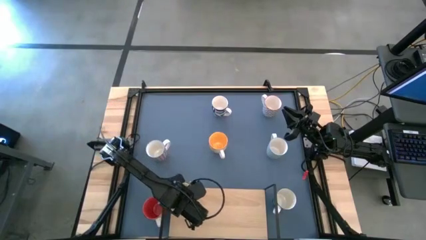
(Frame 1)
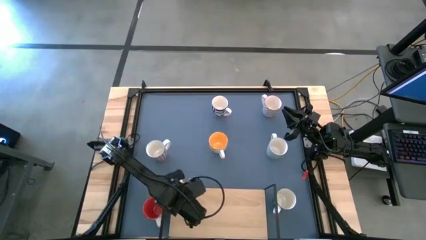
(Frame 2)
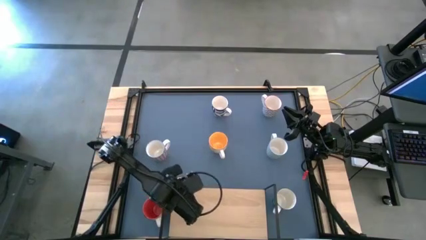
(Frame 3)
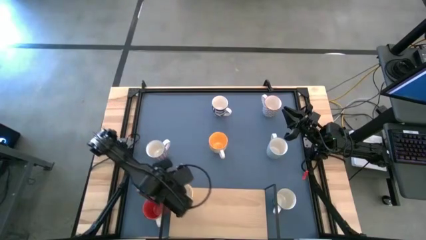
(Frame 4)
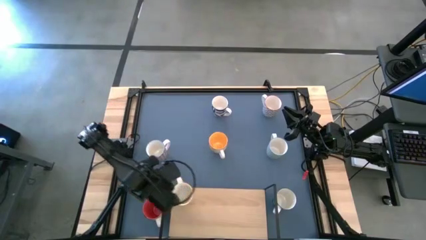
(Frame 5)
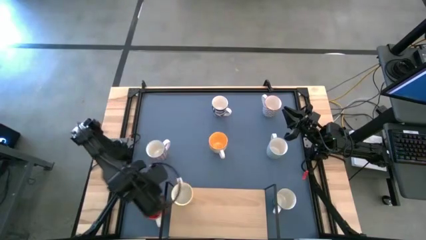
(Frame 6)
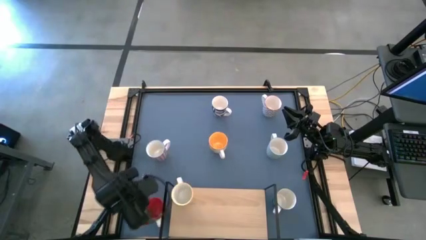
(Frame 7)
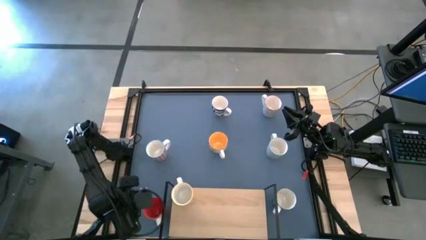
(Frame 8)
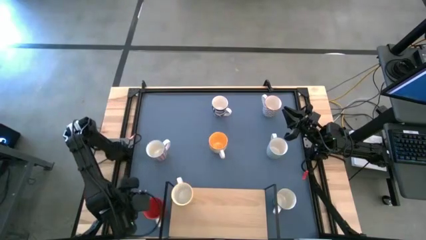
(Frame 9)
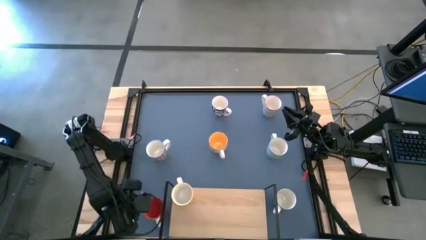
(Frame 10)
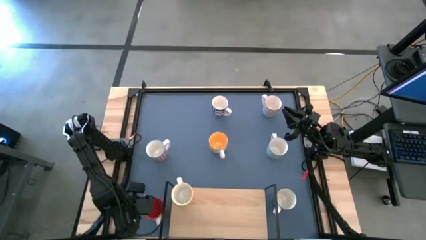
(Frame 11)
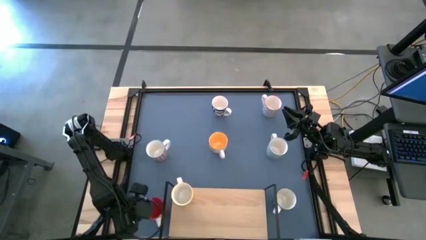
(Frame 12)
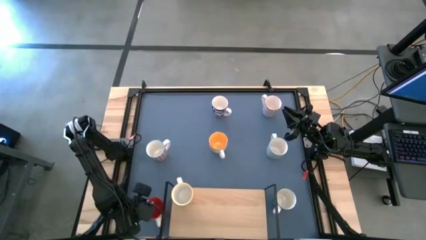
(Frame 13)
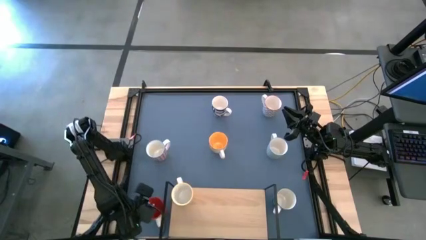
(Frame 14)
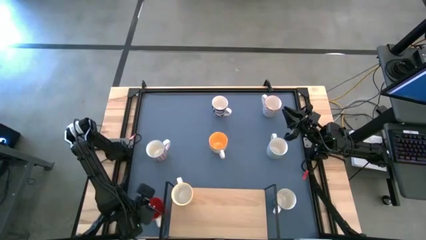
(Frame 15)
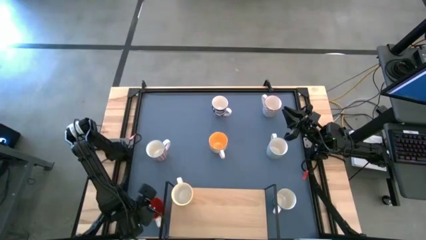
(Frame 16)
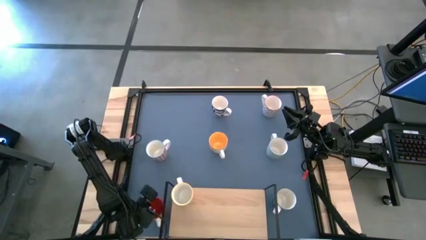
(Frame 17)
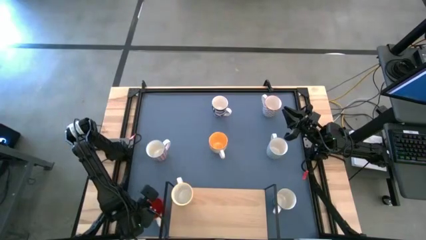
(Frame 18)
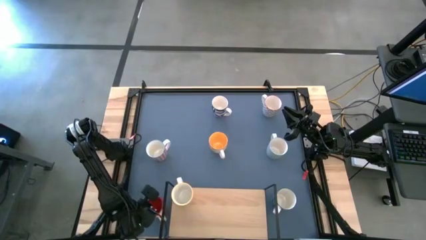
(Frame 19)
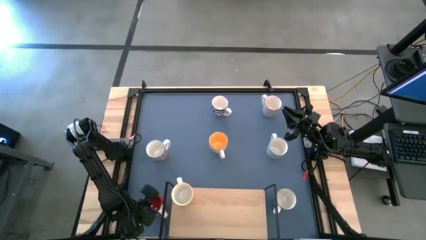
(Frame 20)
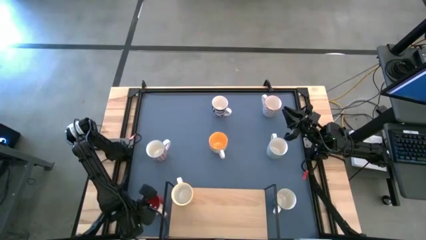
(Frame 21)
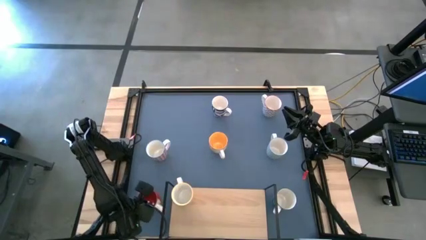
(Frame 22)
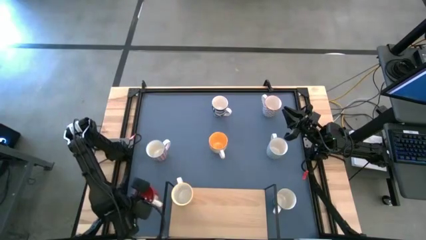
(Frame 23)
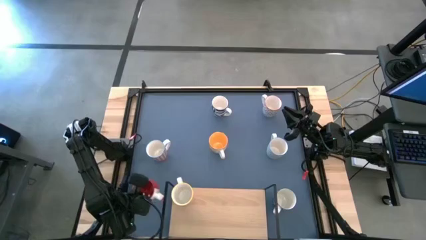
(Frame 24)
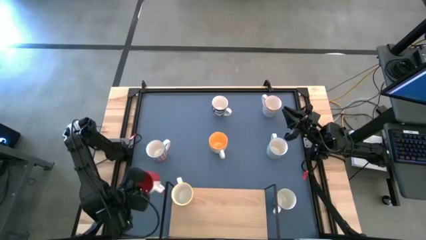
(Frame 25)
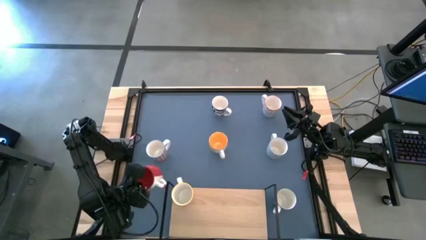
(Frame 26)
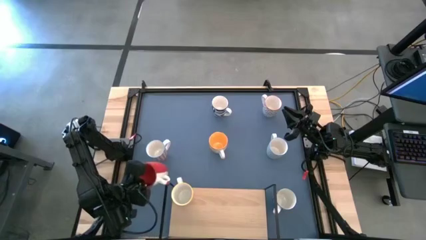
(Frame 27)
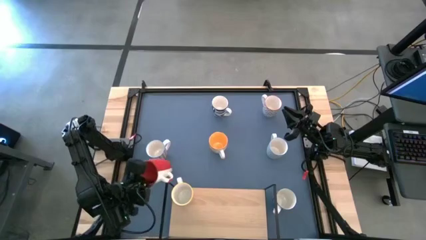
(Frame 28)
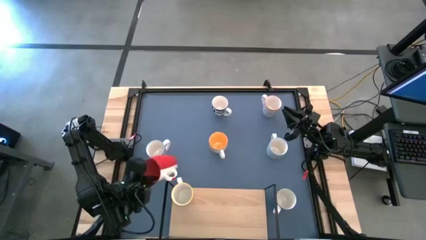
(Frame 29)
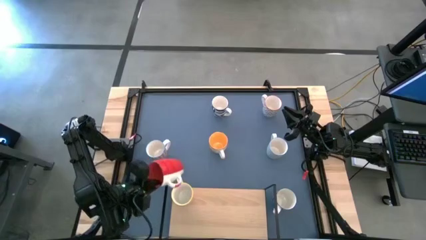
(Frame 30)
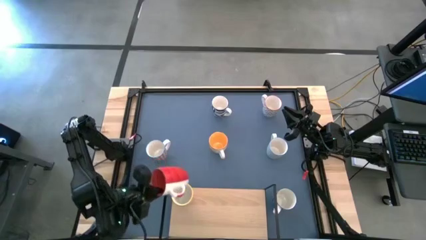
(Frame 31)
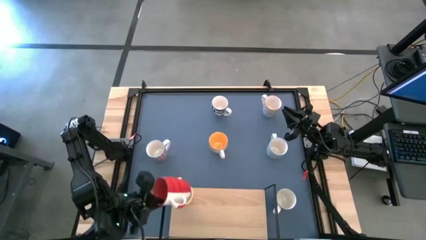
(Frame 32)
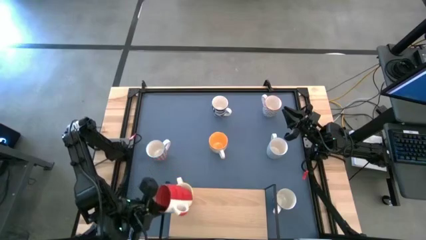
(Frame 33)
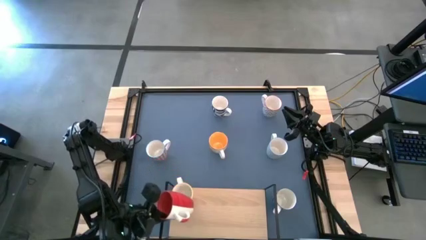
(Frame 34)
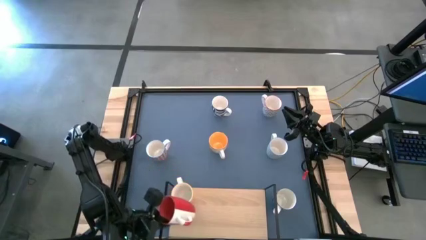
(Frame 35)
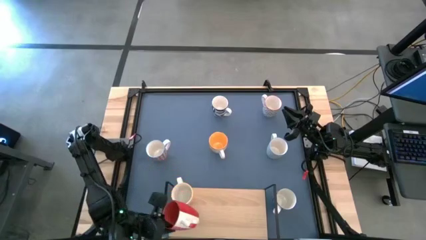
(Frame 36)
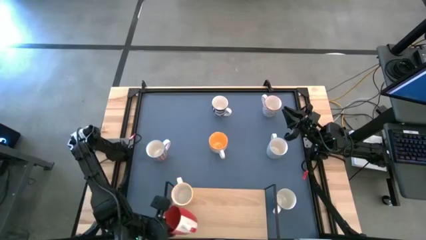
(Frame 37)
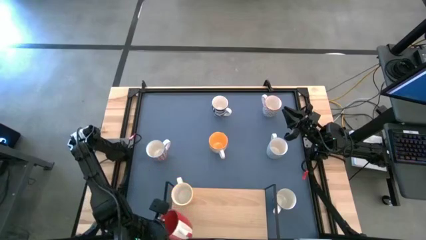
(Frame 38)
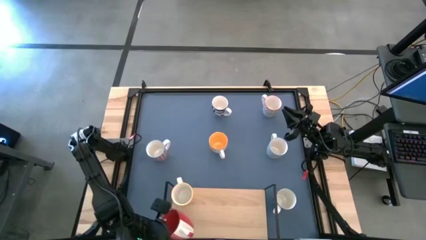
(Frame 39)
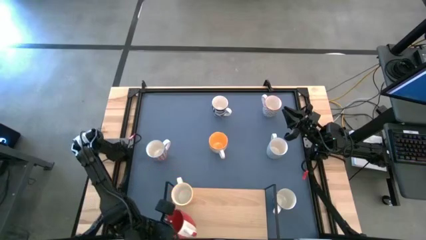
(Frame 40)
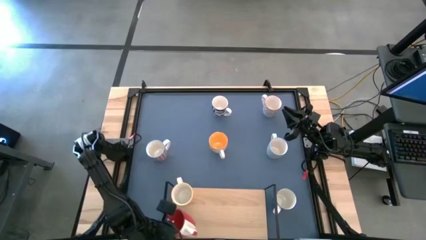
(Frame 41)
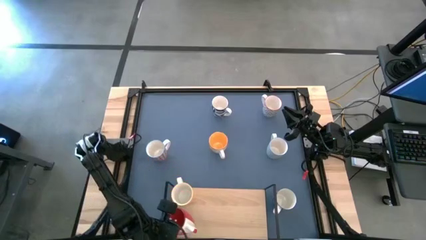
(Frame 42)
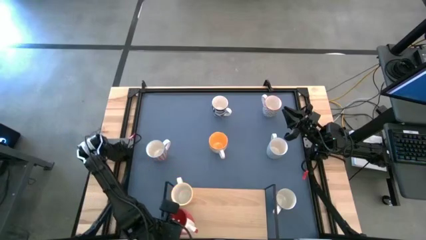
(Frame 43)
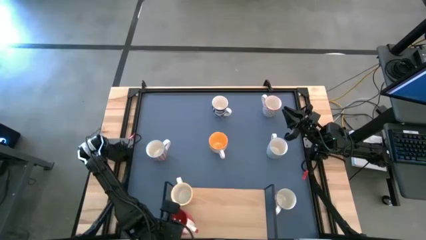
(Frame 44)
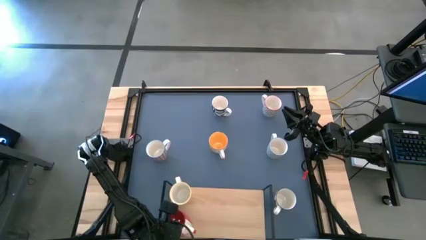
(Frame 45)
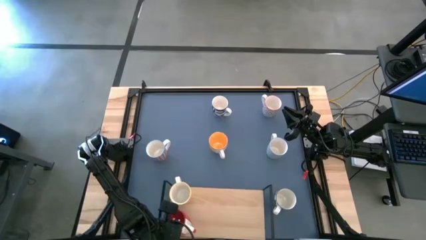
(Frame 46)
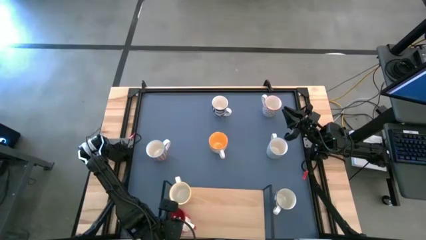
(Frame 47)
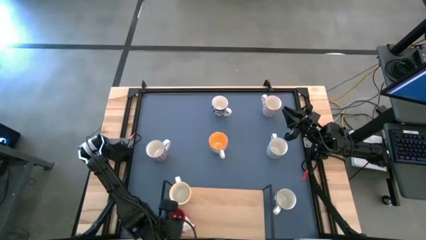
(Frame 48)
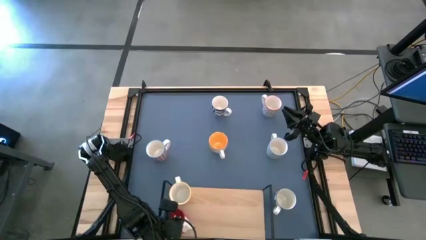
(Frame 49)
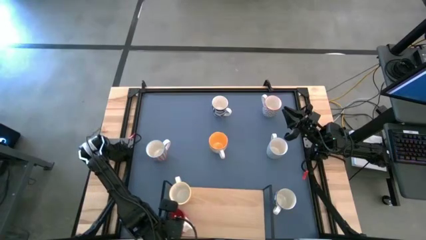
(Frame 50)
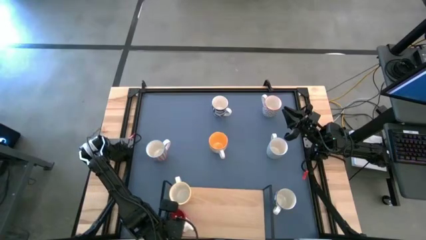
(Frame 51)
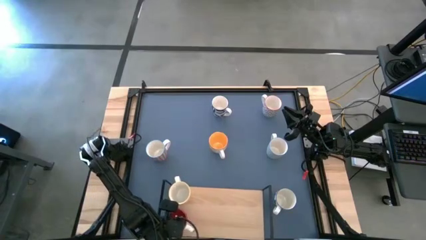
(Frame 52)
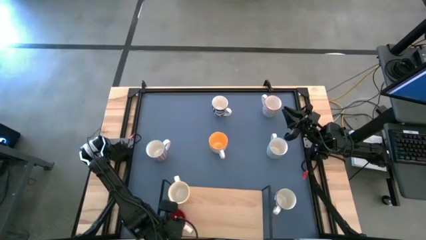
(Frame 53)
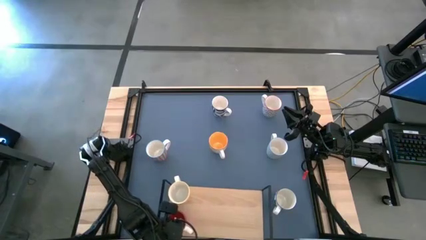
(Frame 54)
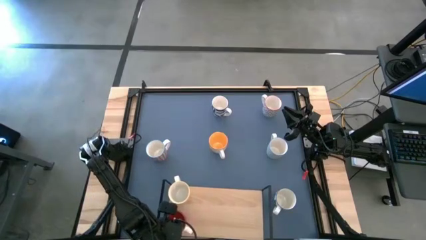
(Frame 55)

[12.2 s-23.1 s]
Task: Place coffee mugs
Put the red mug on the shelf

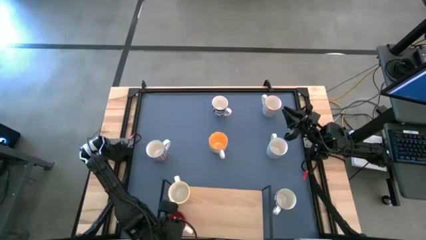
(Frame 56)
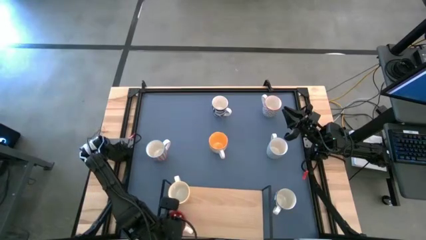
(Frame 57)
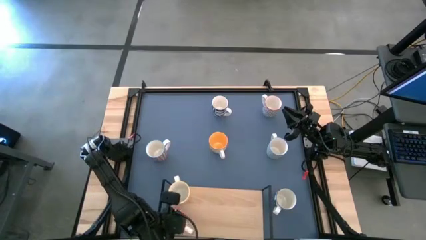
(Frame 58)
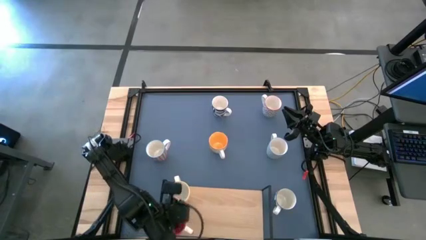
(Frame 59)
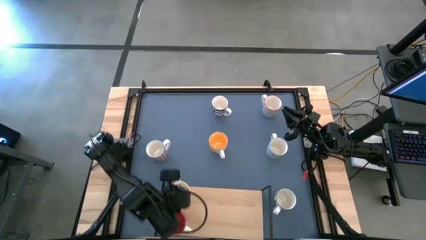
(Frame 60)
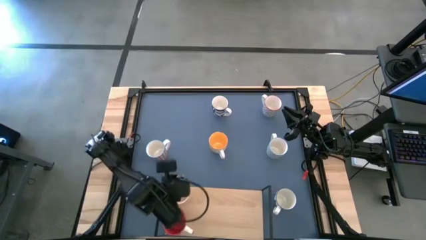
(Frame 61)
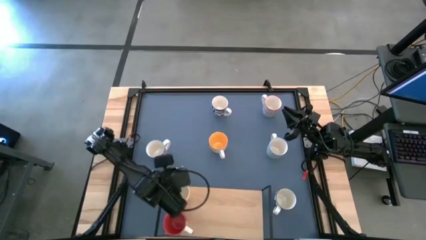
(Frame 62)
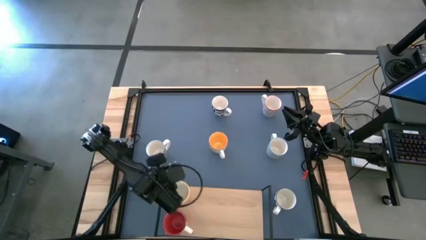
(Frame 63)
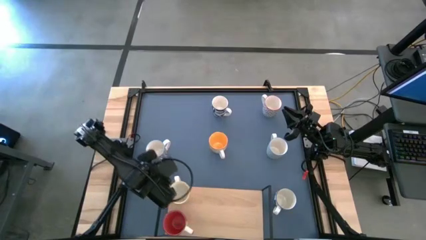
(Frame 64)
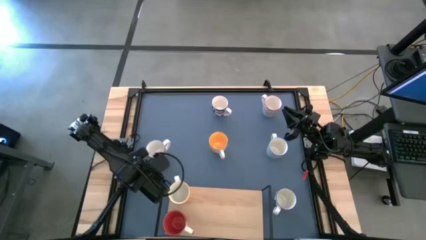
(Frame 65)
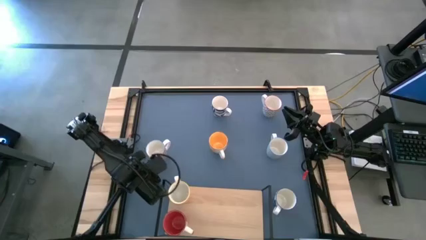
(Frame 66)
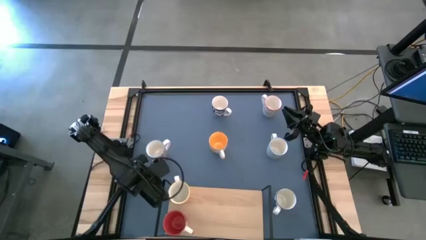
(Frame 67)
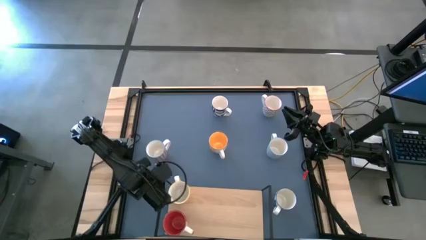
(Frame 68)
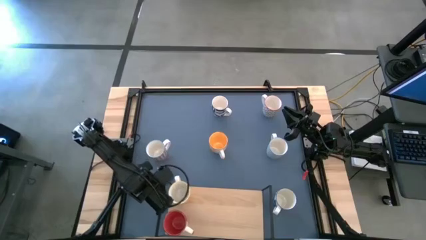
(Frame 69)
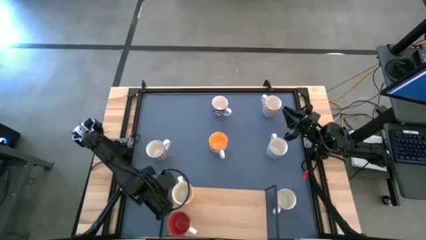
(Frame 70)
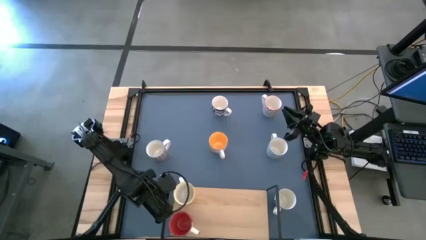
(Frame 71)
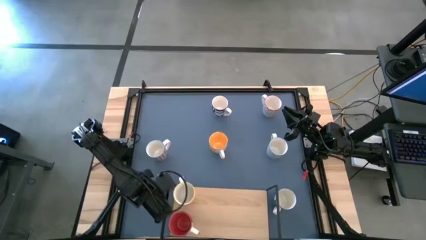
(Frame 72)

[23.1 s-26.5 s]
Adjust the shelf
